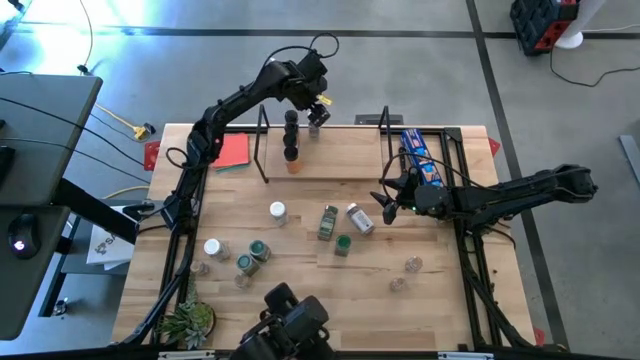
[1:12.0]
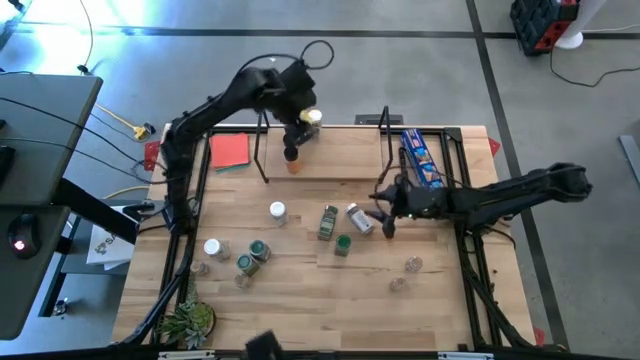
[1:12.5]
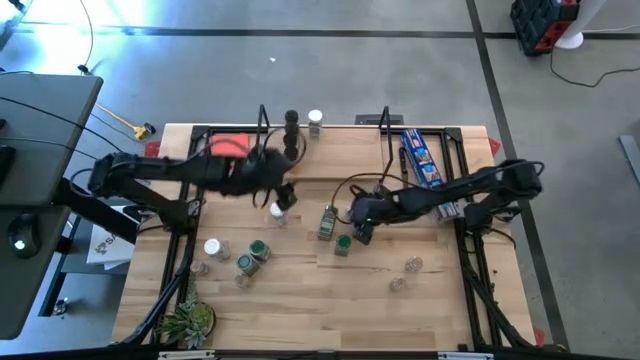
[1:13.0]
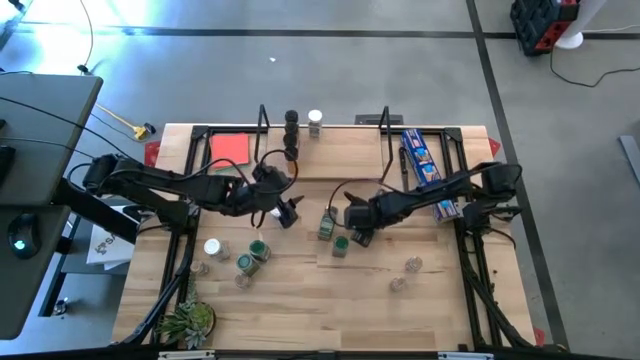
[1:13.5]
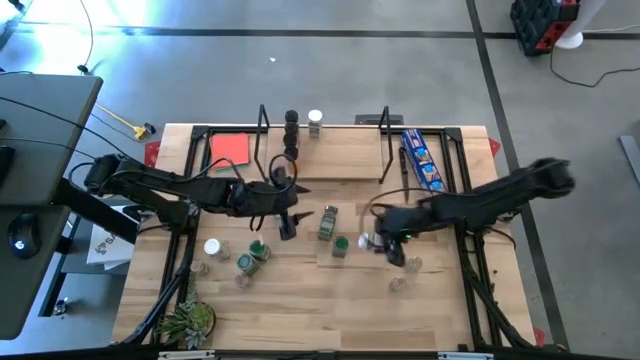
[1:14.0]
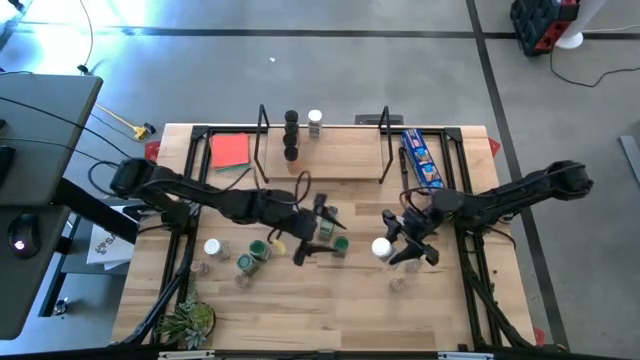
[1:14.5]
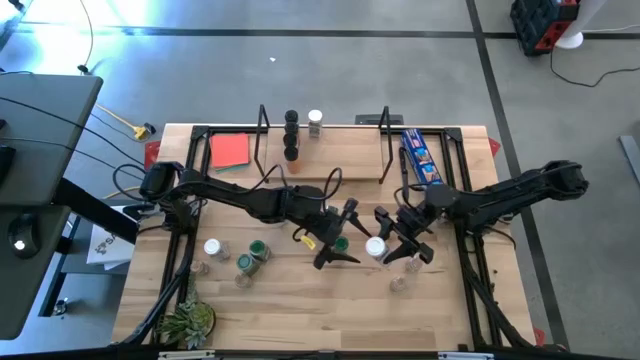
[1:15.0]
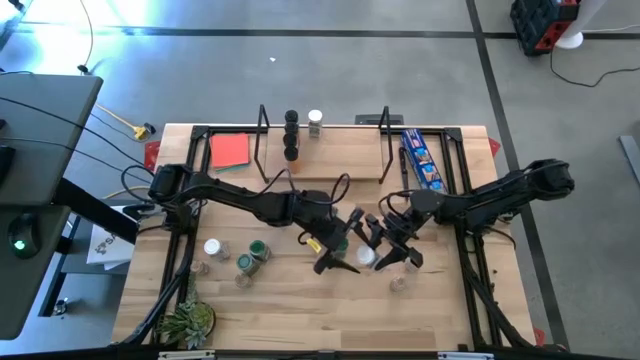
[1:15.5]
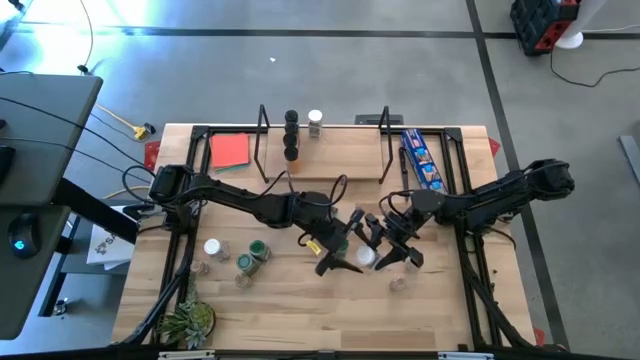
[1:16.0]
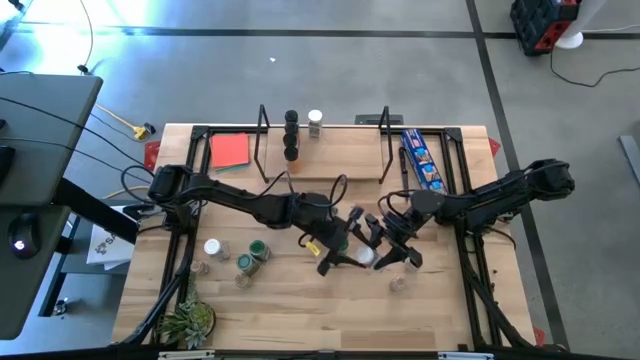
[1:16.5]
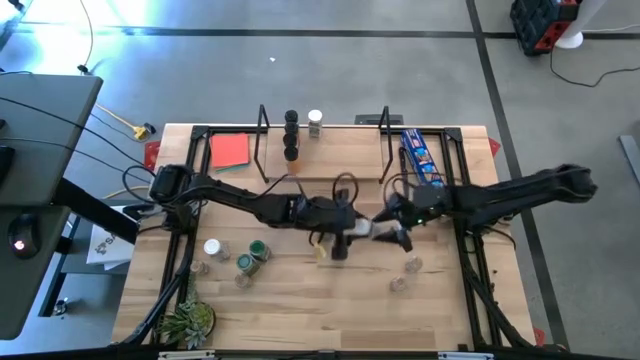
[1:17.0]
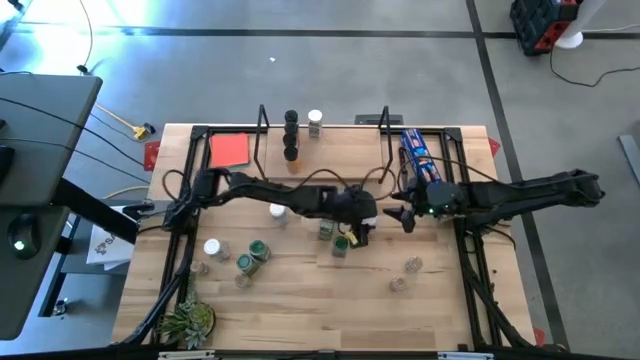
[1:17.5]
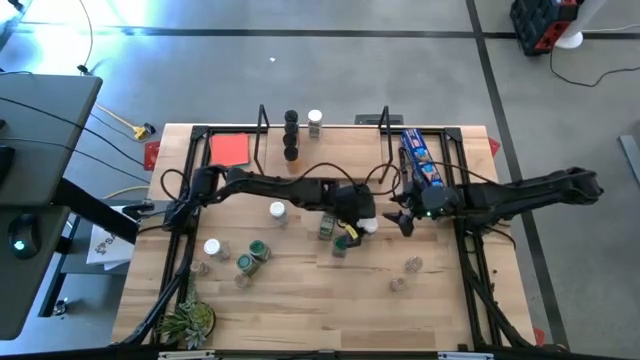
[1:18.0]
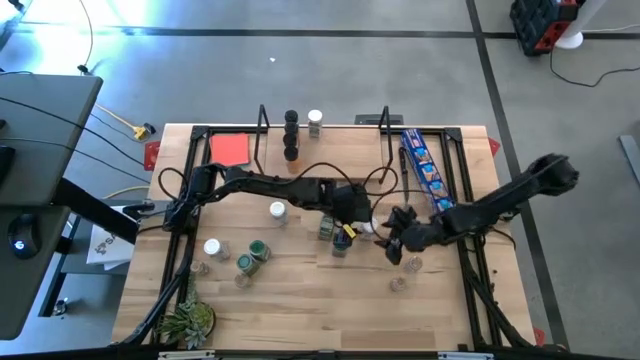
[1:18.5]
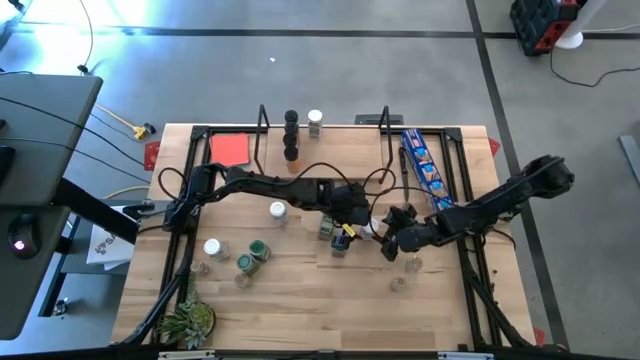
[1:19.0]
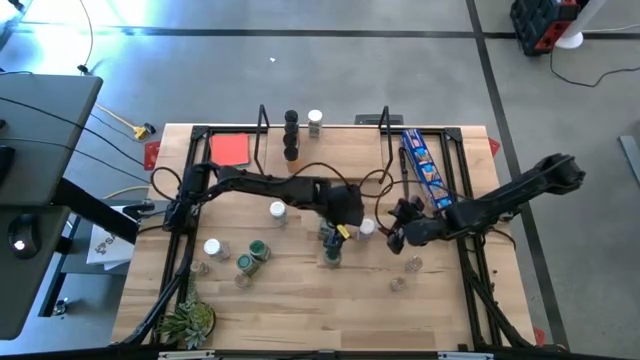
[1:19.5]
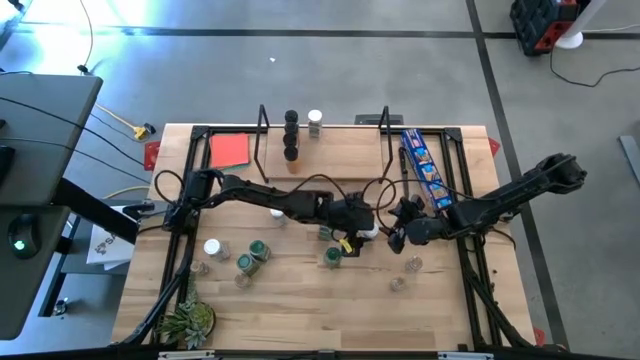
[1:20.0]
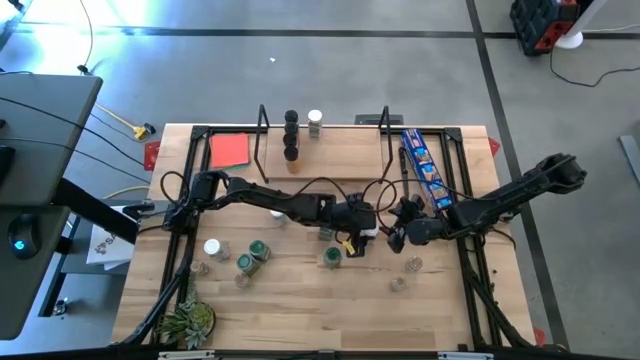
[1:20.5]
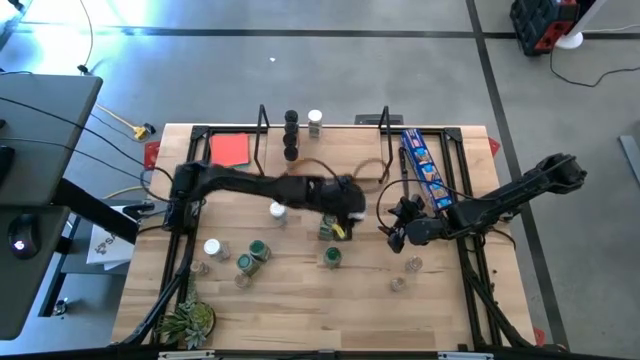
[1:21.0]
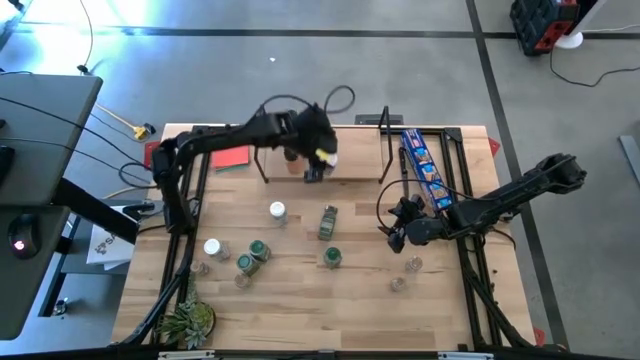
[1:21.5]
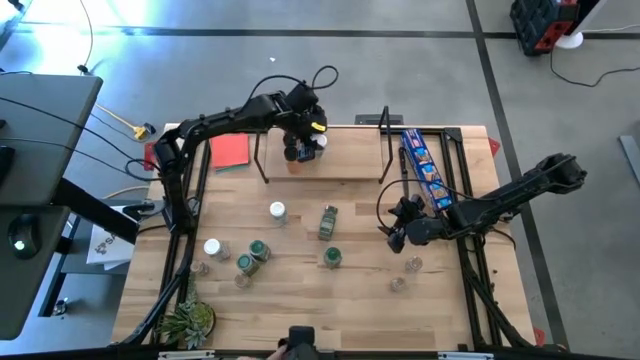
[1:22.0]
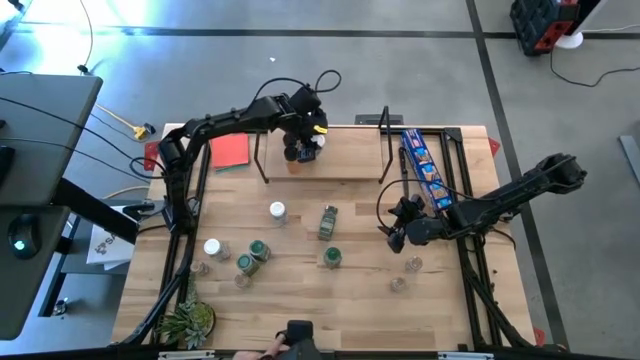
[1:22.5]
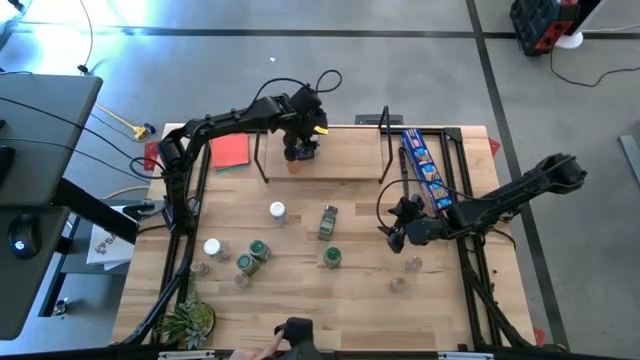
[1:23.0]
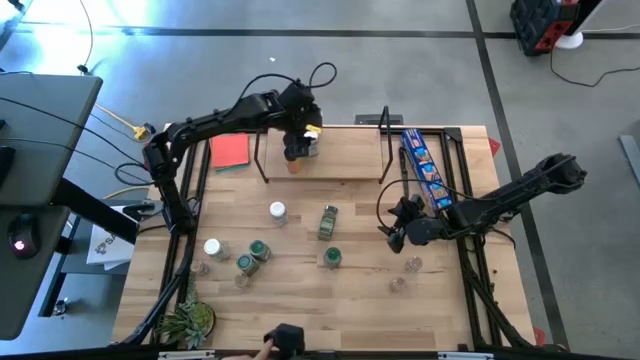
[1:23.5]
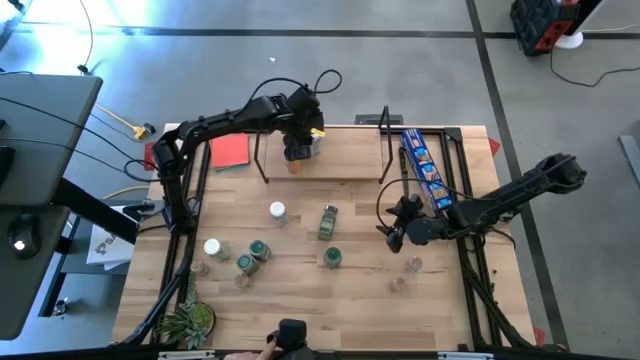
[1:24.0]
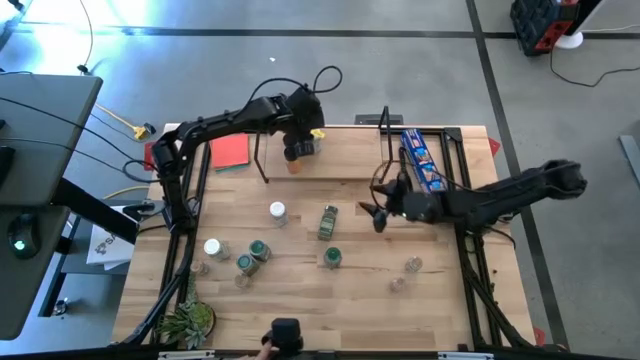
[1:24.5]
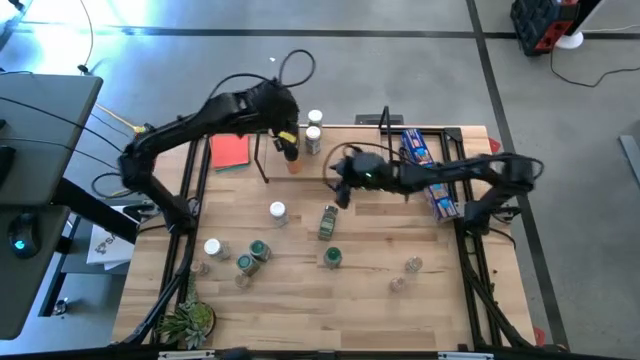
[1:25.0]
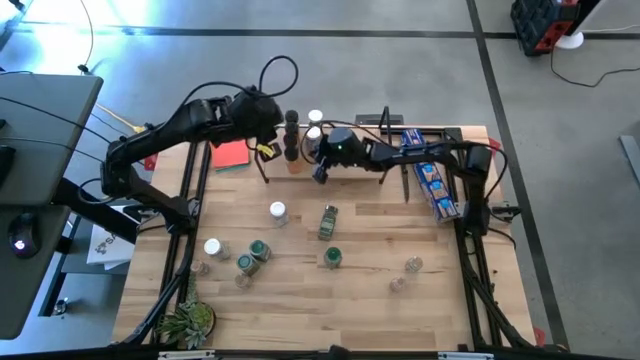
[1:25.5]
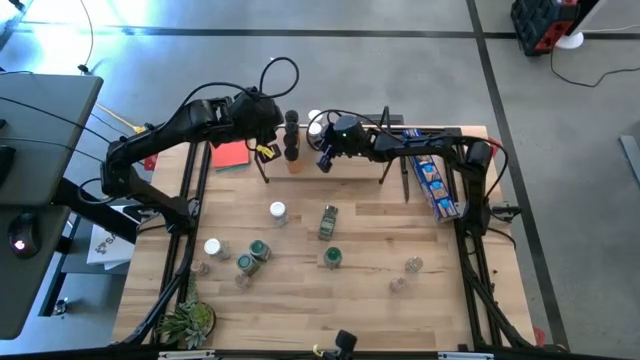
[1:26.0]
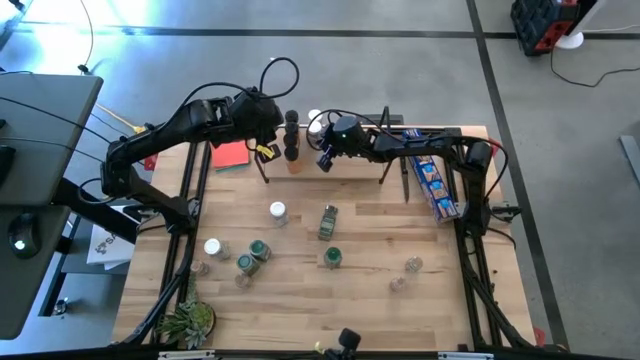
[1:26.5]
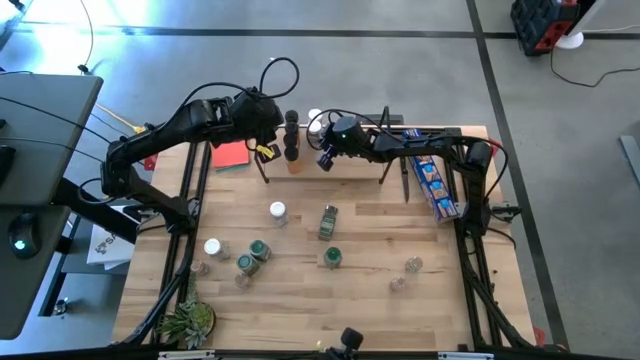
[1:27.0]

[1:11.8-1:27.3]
Task: Shelf spices
Put the white seasoning bottle on the shelf aligned with the other white seasoning bottles

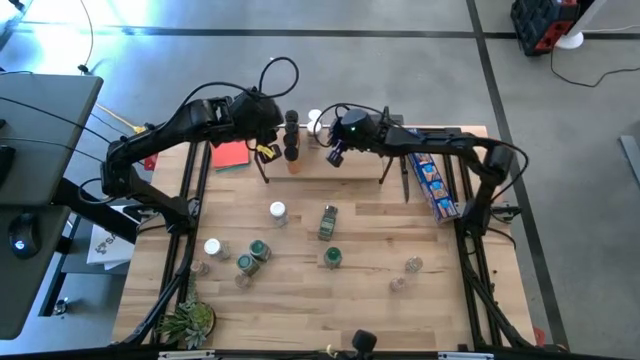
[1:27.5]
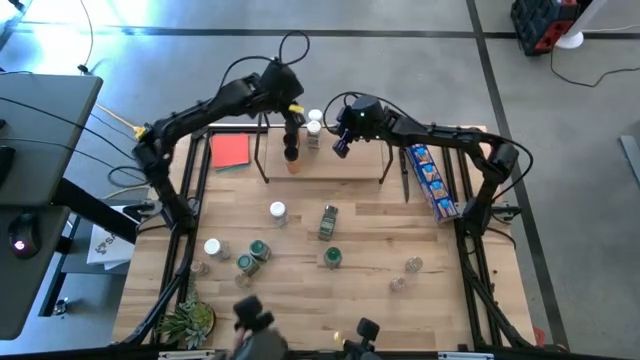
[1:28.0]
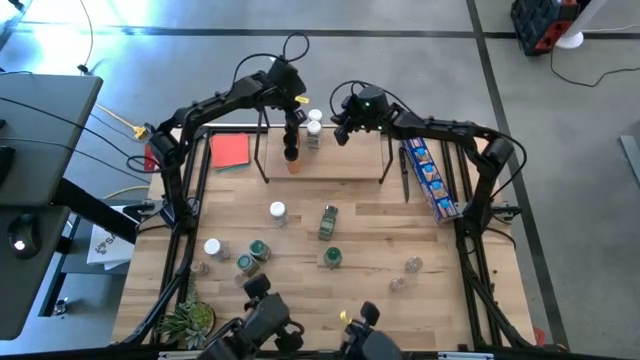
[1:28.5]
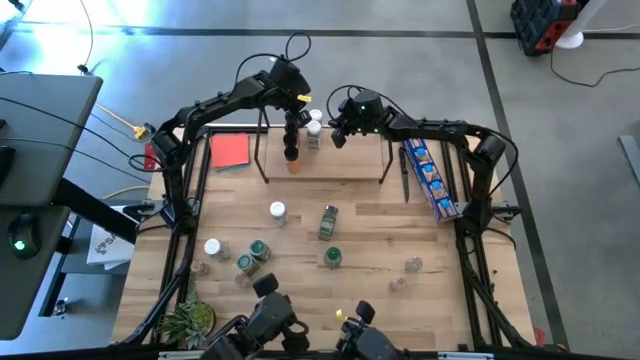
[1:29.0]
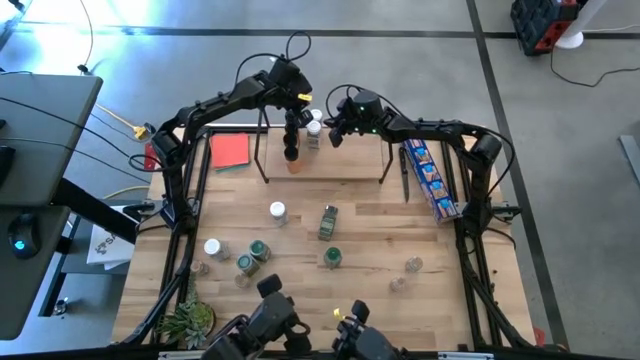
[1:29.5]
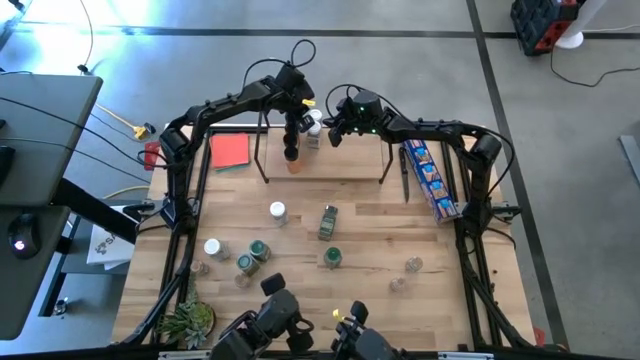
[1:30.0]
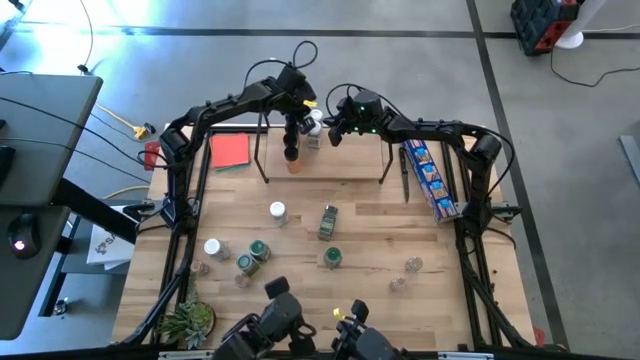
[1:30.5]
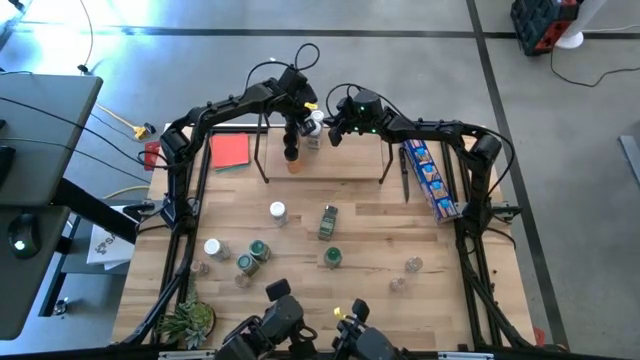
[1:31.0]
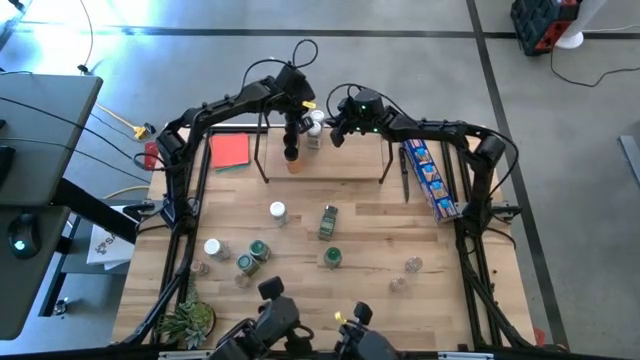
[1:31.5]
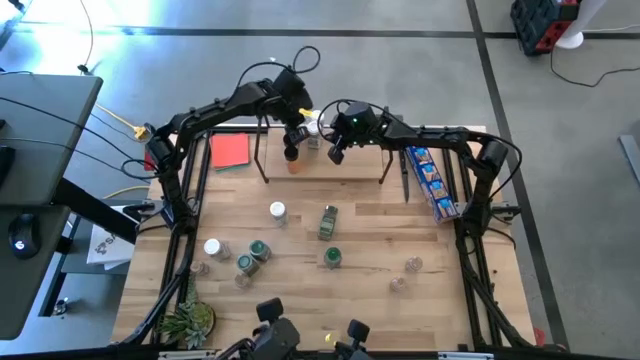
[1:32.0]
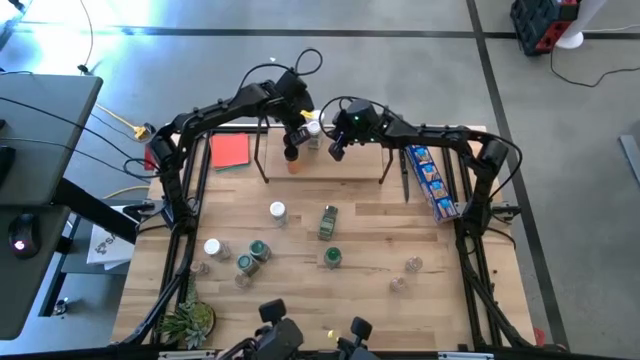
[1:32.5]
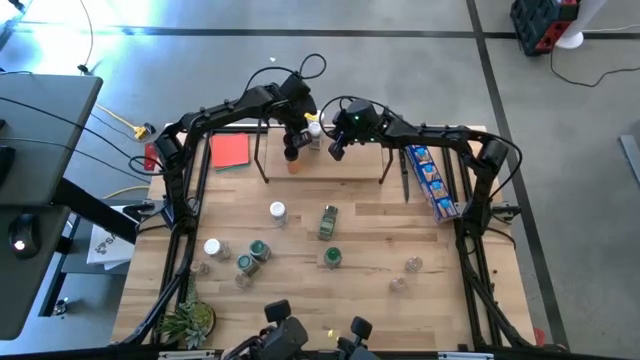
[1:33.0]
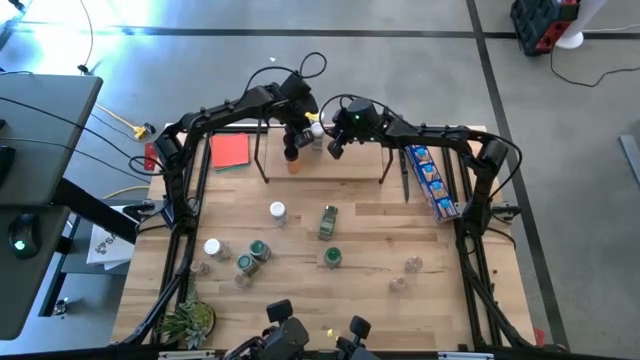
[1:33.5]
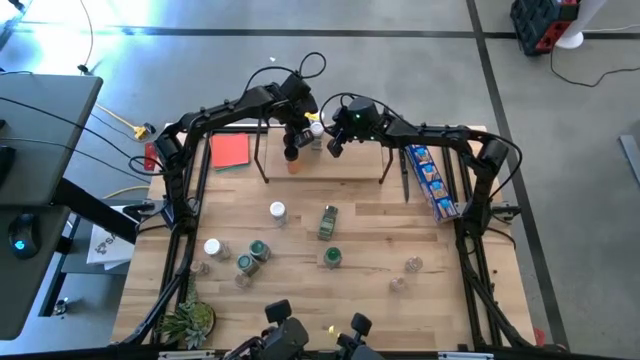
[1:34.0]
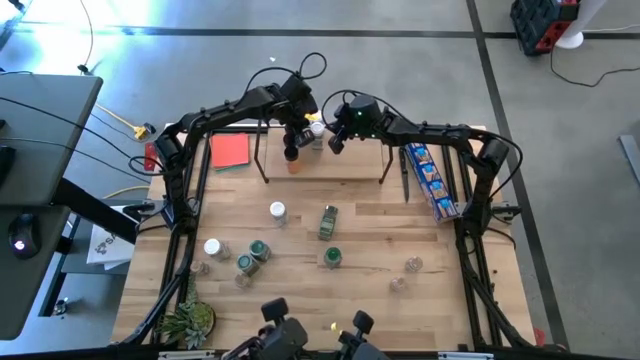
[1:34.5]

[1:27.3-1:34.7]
Adjust the white seasoning bottles on the shelf
